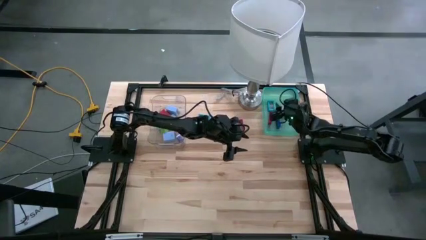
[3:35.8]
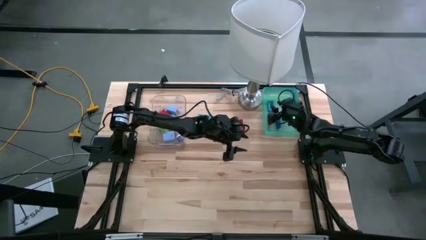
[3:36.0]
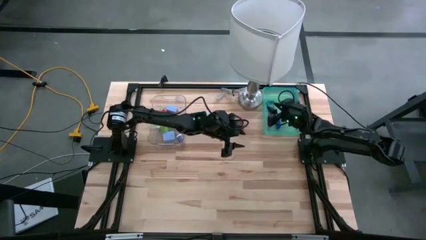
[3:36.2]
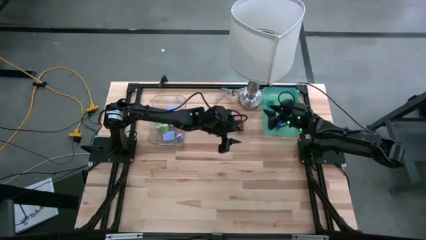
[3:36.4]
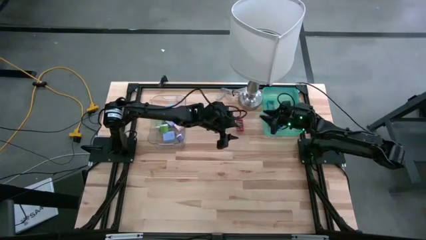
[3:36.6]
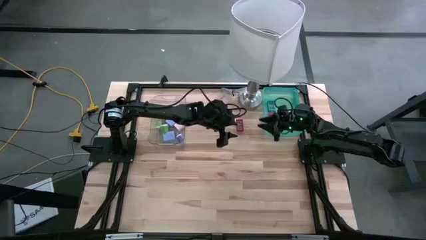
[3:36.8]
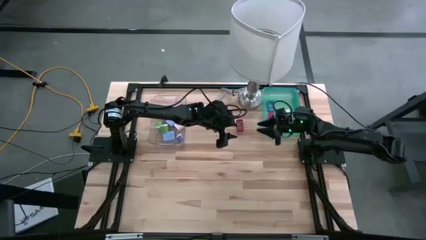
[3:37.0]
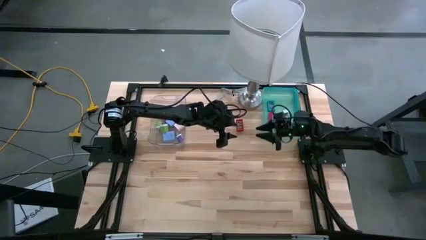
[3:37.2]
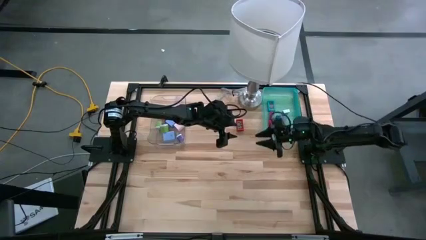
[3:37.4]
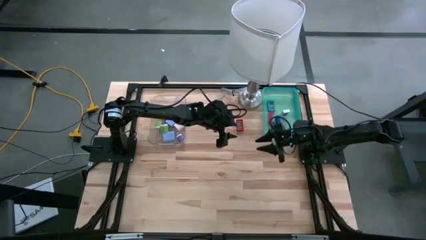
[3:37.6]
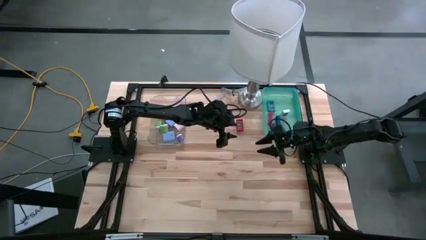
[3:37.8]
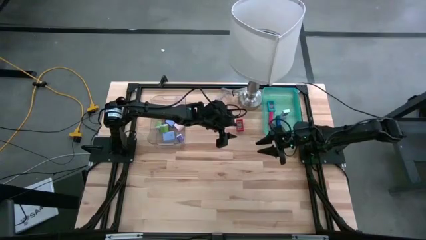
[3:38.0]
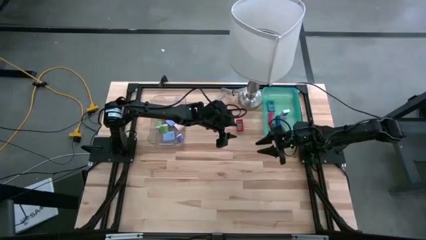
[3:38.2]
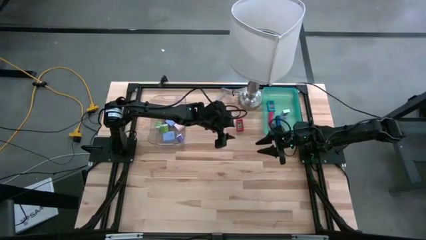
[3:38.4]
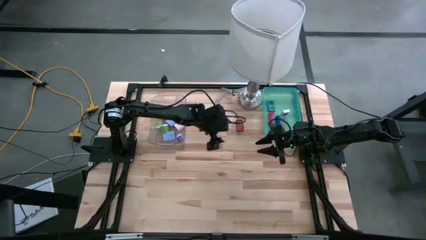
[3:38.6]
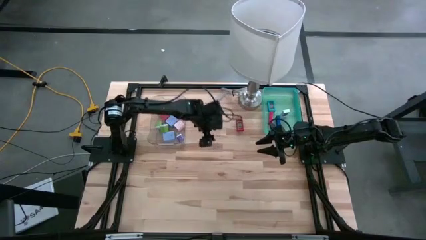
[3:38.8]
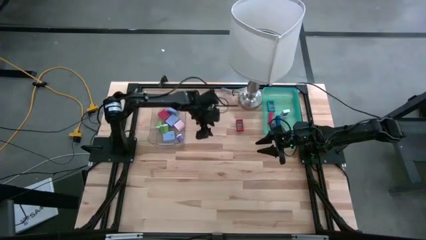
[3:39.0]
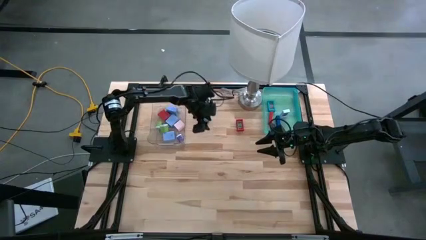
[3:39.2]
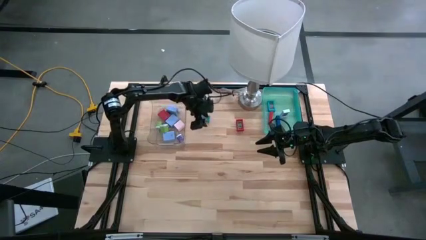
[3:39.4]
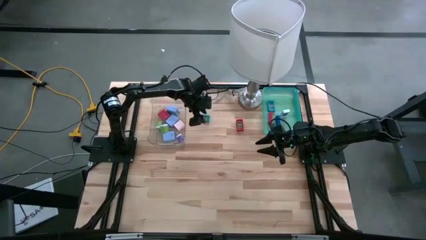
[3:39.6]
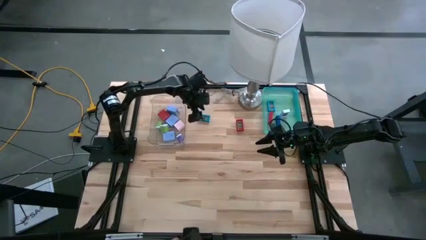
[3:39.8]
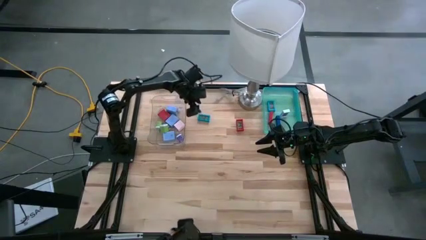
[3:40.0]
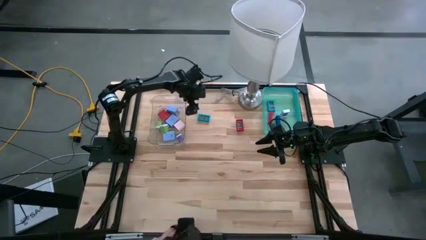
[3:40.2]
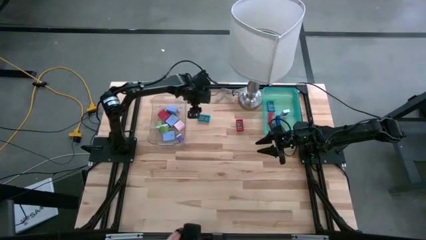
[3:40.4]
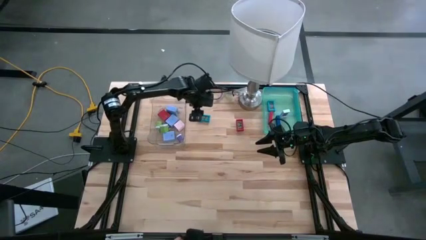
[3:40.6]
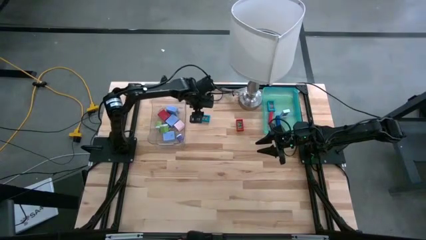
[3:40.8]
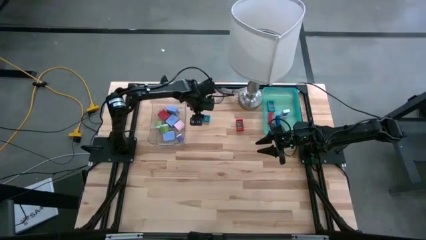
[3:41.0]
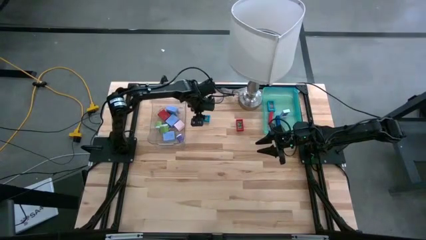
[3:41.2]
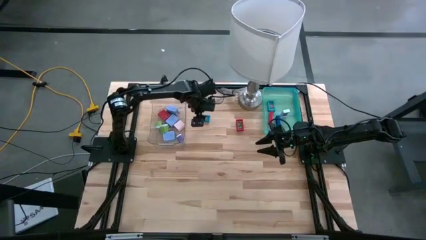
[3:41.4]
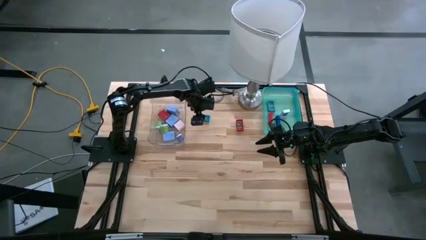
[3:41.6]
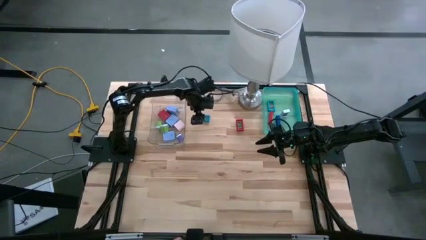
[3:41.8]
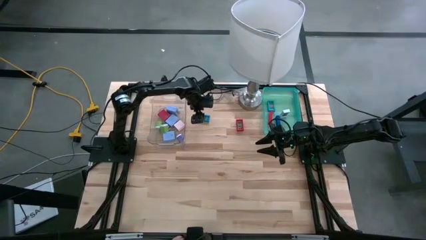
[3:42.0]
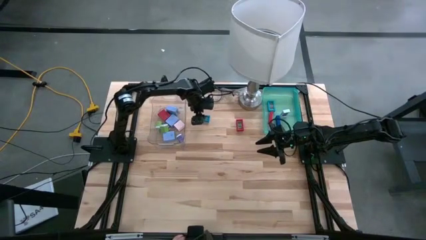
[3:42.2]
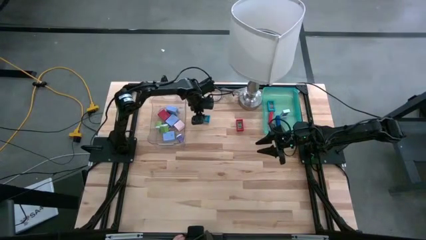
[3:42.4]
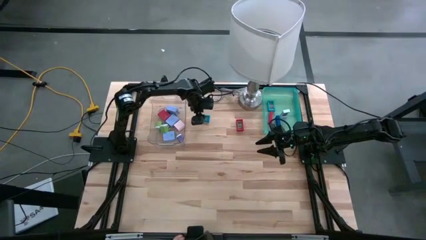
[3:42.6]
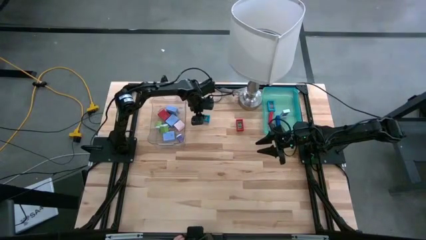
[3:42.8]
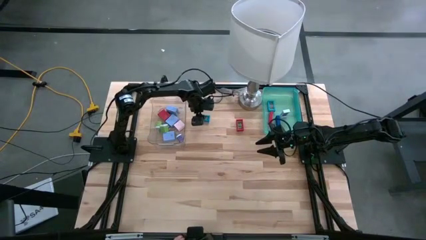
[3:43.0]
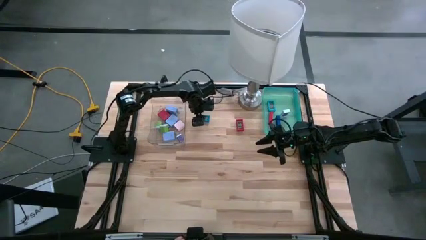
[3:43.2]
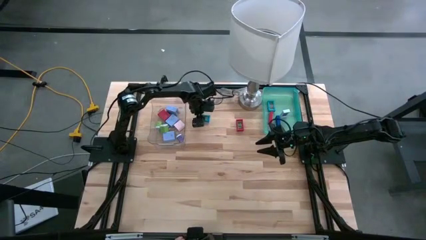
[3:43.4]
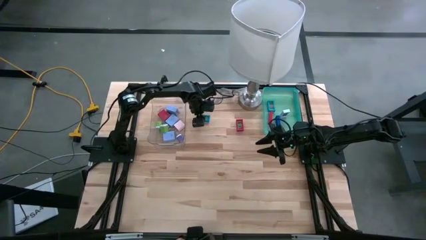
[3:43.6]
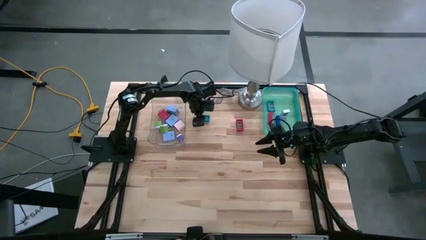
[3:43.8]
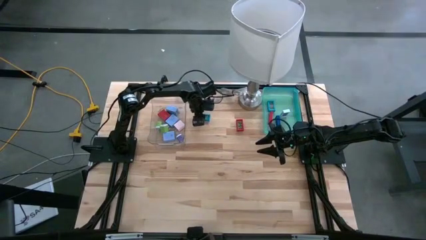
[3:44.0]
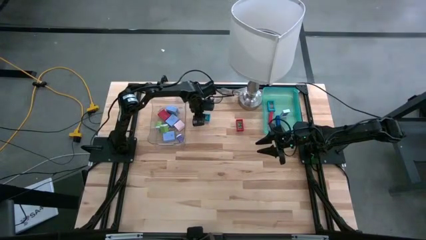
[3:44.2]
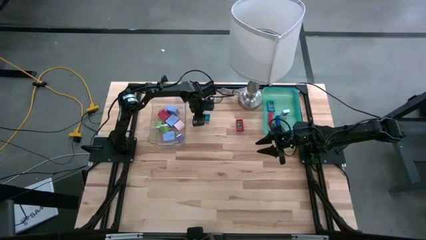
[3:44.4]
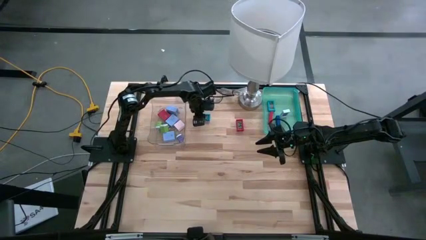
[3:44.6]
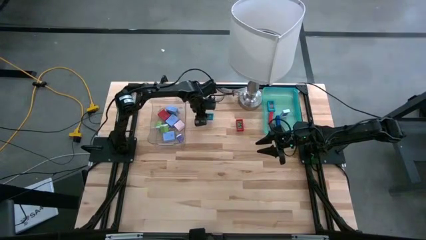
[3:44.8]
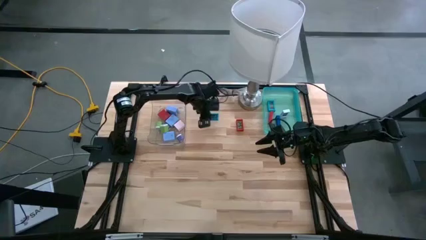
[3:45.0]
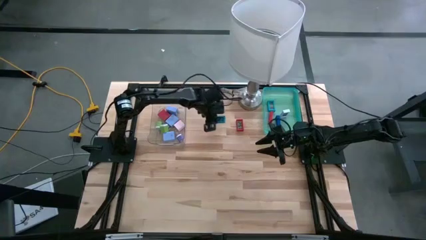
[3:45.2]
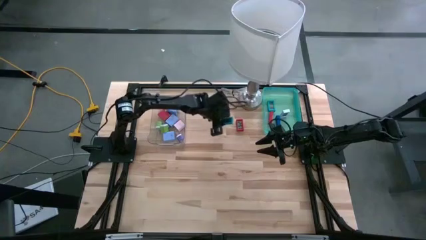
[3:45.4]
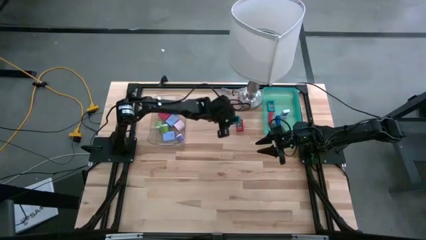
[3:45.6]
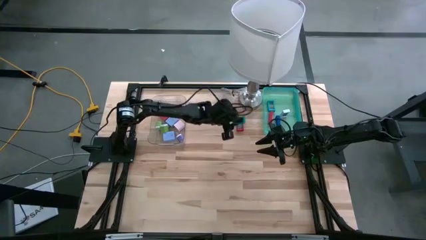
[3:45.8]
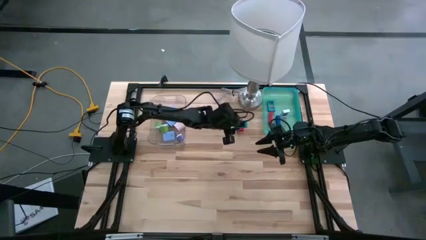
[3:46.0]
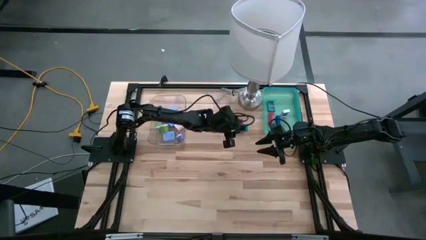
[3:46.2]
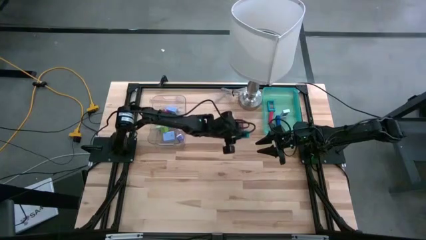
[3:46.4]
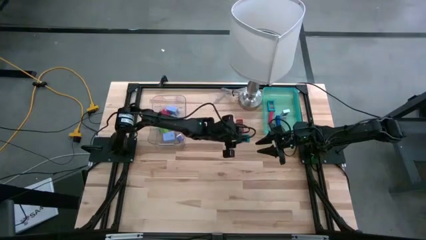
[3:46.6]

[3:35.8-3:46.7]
Task: Pick & Place Office items
Put the light blue mini digital clock into the light blue bin

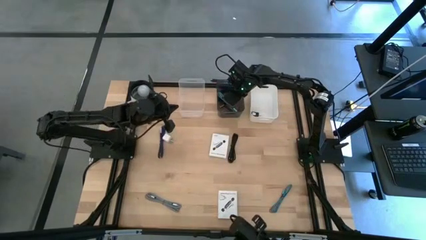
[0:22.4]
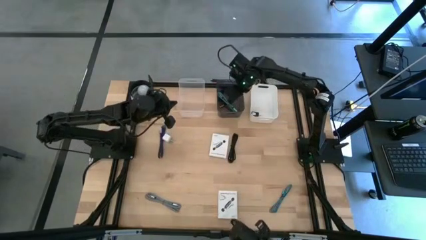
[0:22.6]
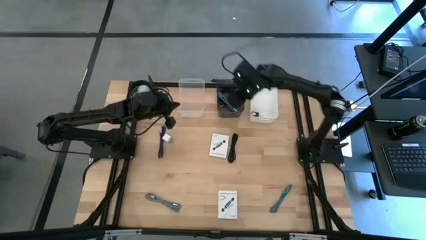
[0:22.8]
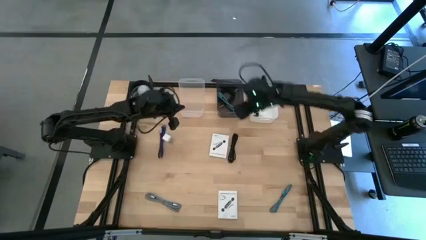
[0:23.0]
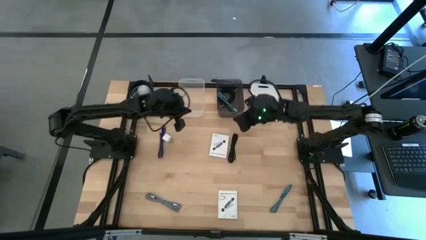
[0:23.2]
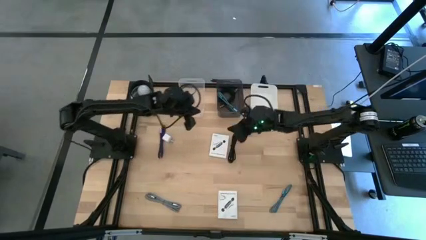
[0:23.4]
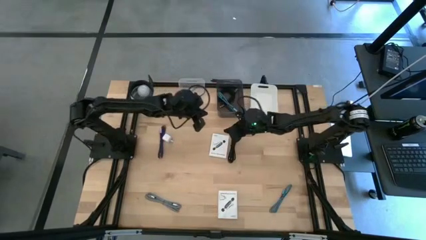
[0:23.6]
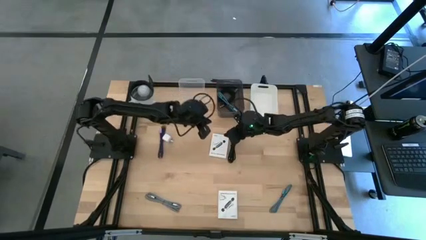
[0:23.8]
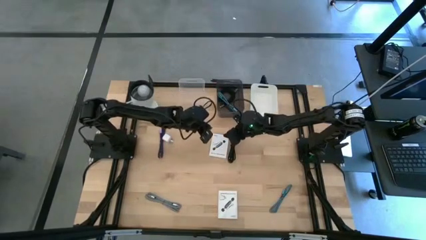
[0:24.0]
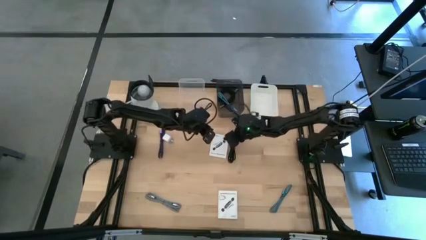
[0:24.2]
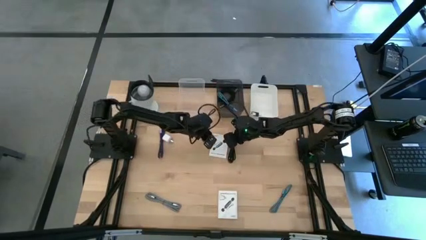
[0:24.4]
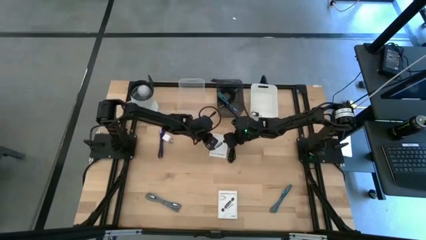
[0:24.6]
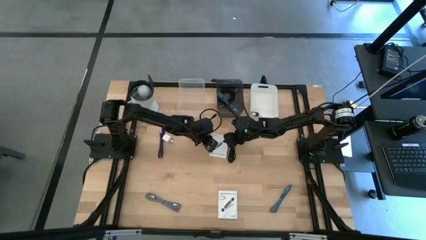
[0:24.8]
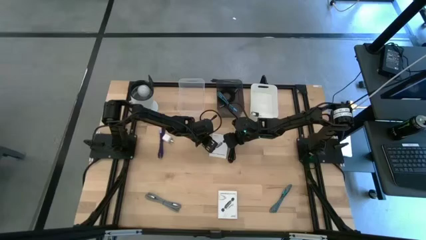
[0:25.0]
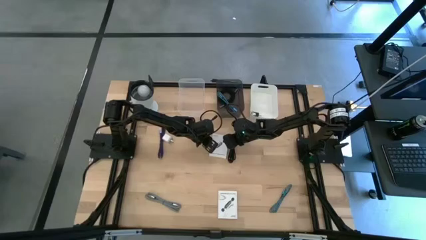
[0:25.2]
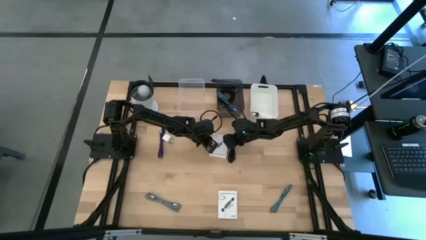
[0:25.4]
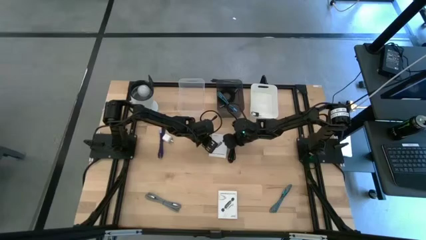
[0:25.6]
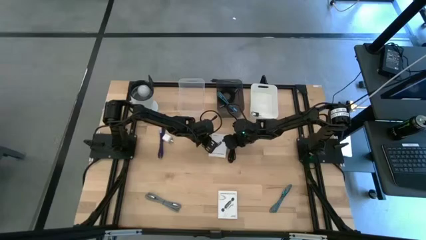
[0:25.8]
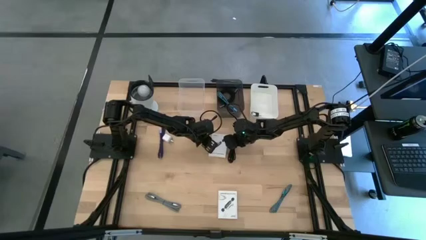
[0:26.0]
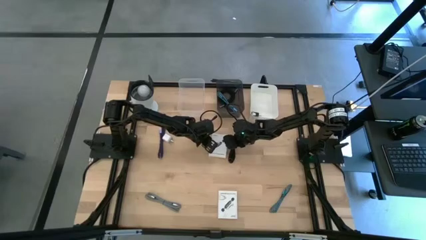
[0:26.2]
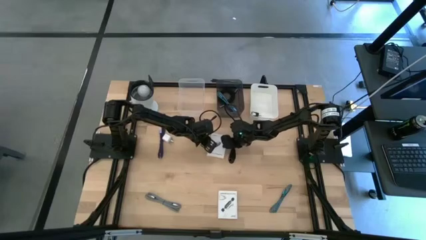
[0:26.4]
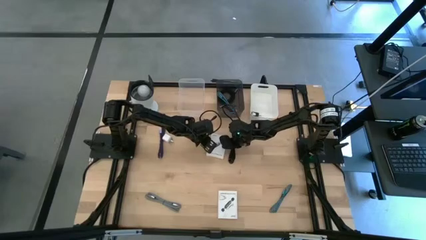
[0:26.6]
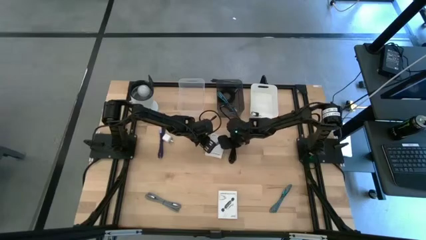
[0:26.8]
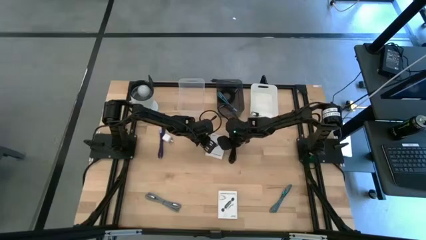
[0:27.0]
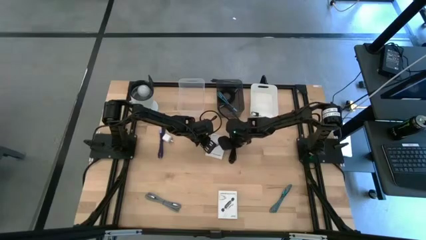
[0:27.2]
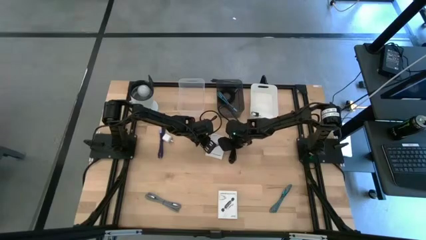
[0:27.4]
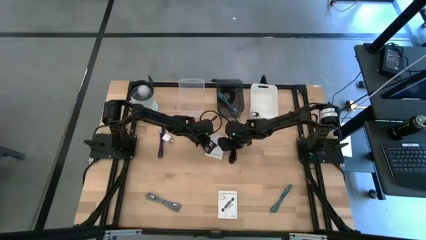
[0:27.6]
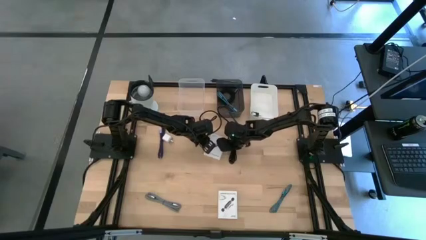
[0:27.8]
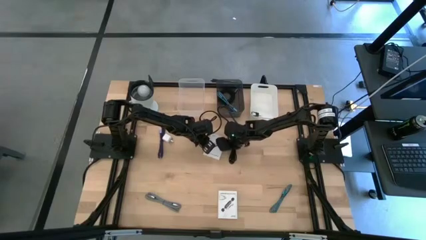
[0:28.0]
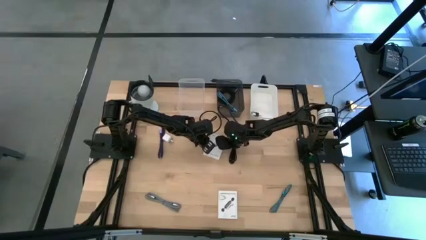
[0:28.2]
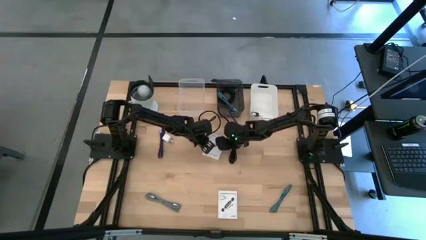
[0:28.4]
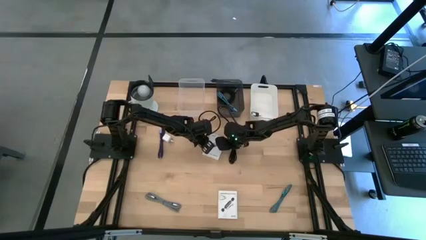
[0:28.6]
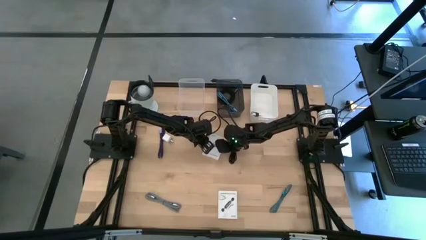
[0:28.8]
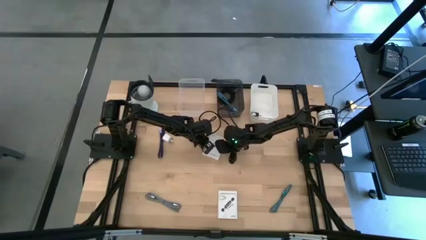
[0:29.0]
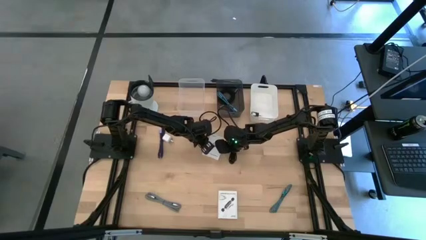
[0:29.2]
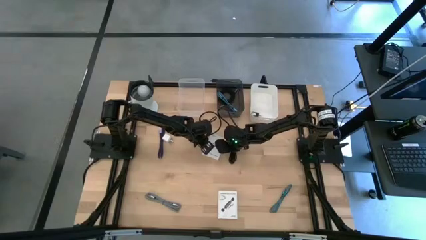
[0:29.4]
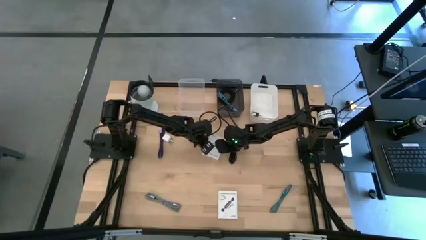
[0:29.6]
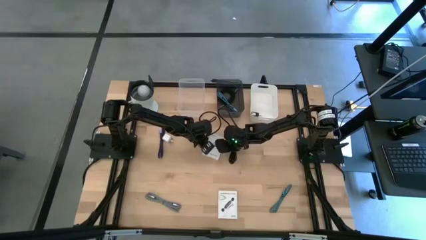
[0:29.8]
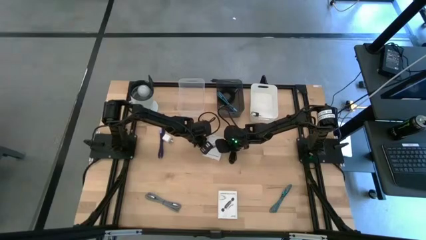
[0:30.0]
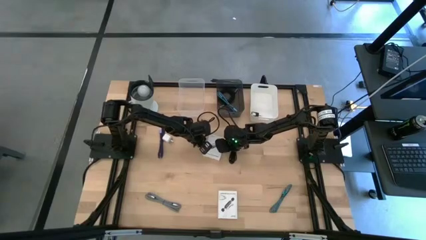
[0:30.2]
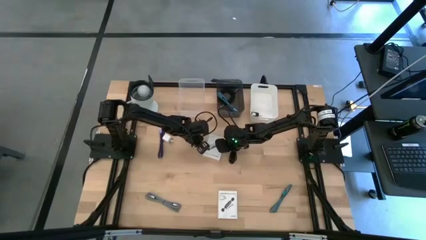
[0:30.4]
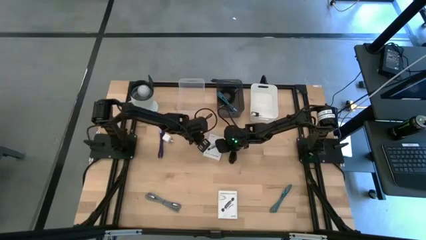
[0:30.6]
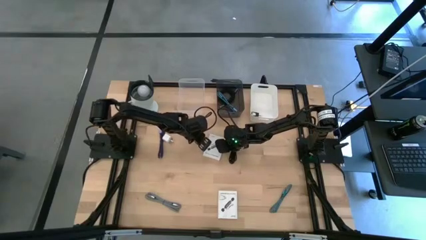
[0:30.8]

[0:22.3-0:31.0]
Task: Pick and place items into bin
Put the top white card reader box into the transparent bin
